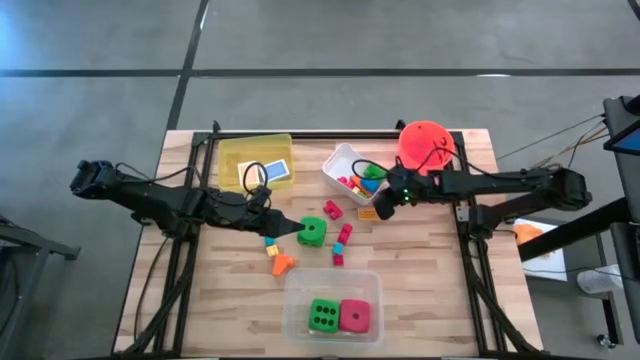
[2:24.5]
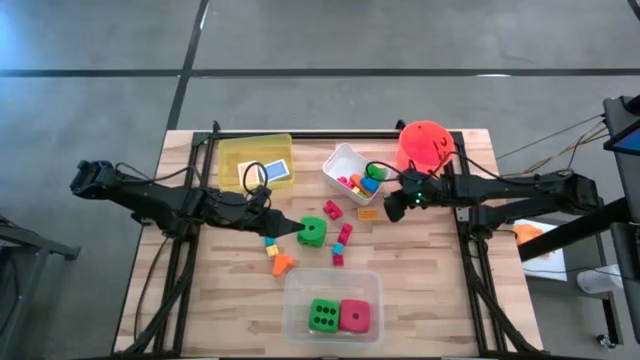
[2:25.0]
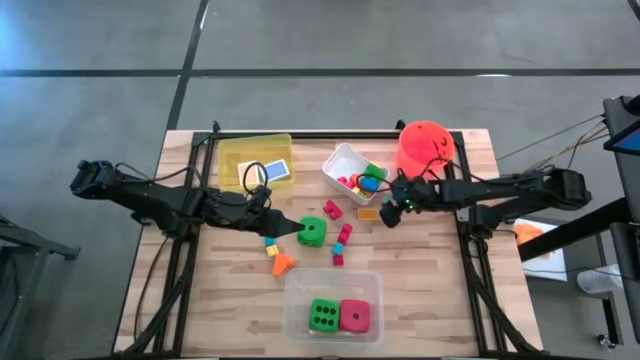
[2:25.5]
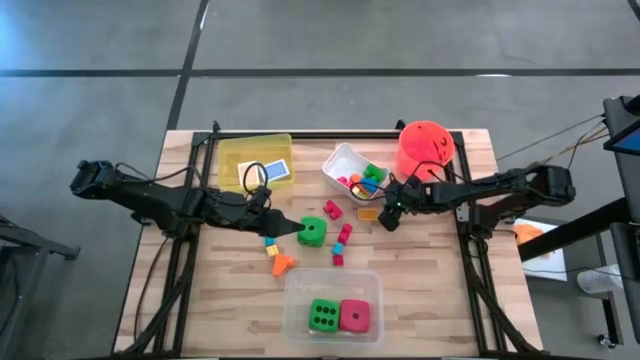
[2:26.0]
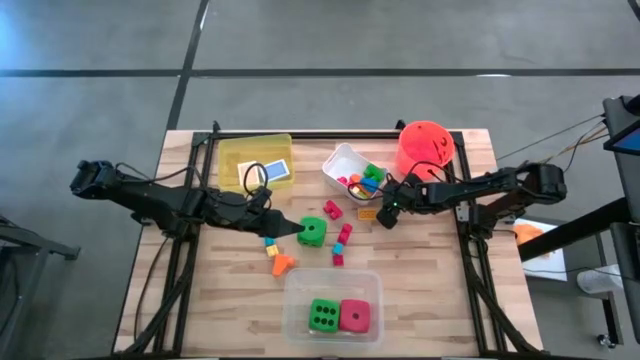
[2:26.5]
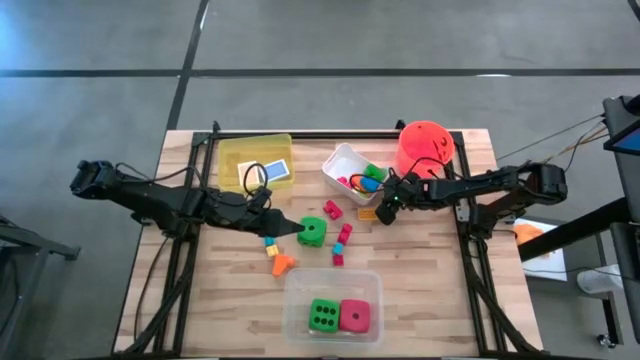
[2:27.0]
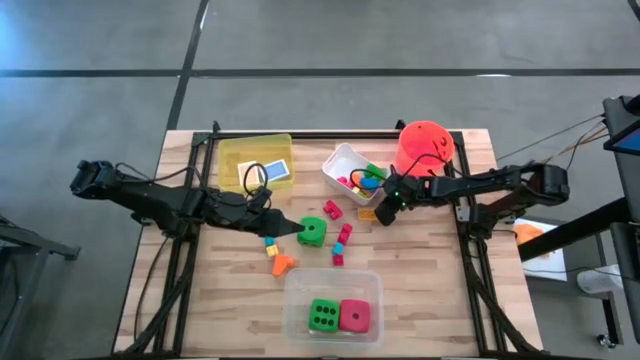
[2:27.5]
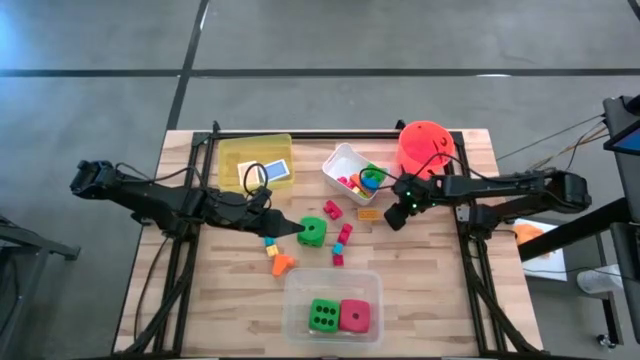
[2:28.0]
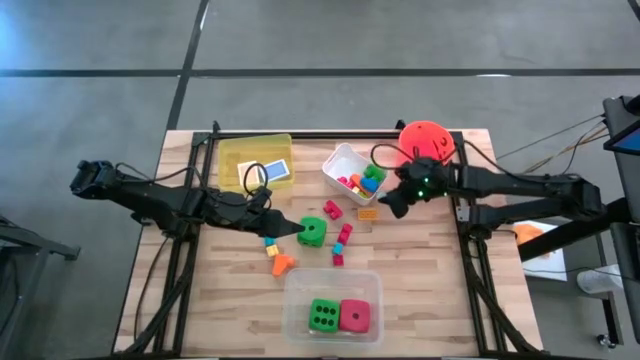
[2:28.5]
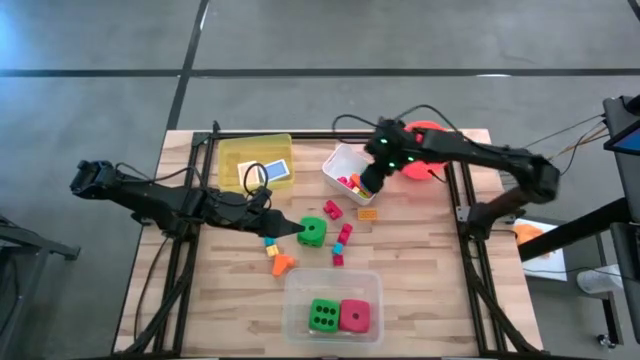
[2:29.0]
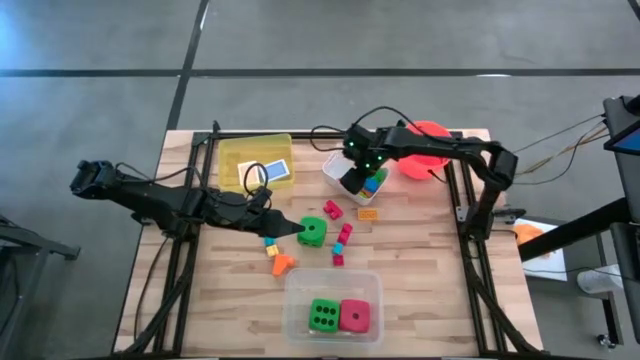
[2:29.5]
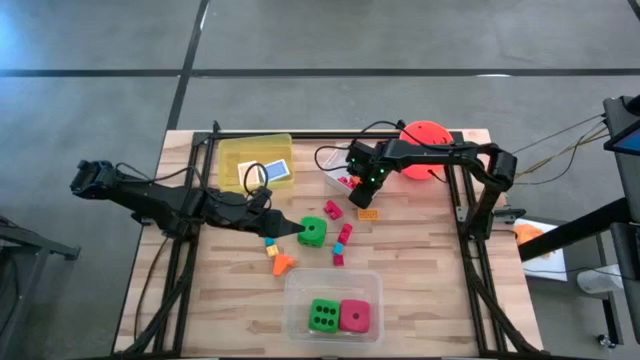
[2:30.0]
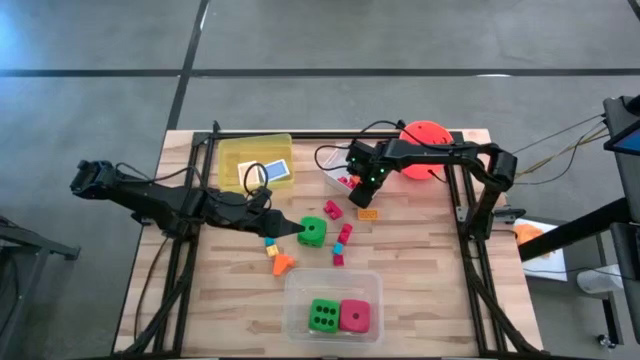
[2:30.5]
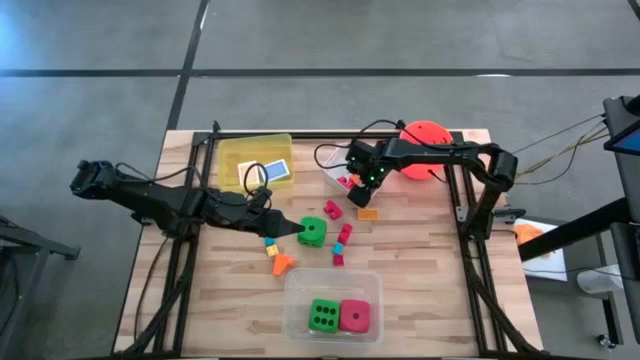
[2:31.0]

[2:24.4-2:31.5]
Task: Pick & Place Toys
Put the light blue game piece into the white bin

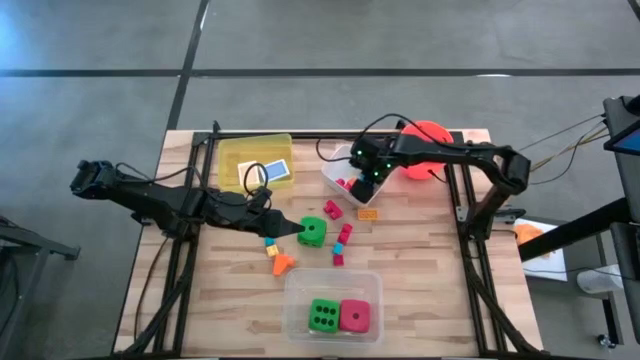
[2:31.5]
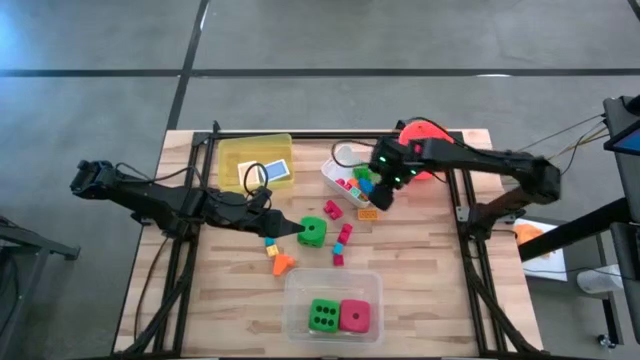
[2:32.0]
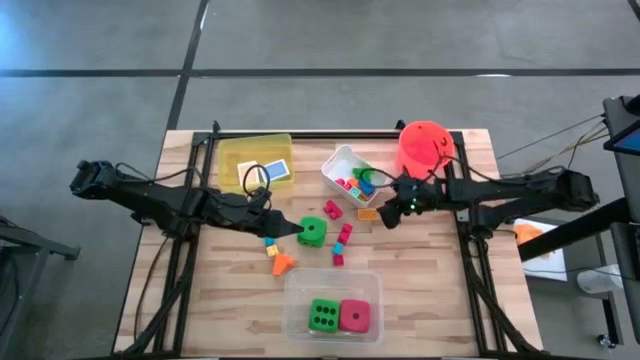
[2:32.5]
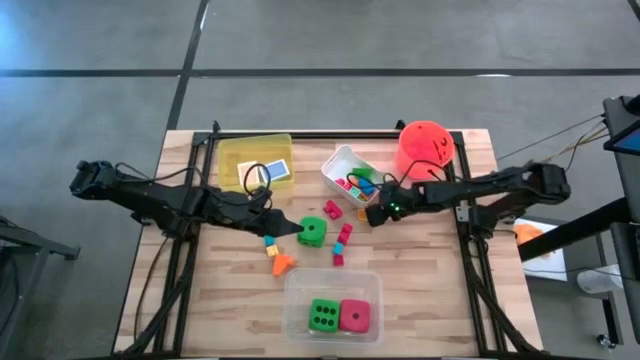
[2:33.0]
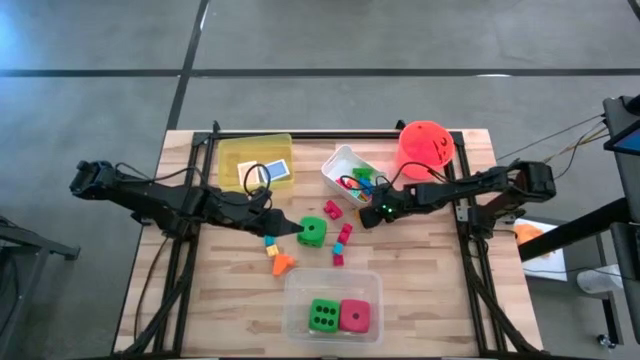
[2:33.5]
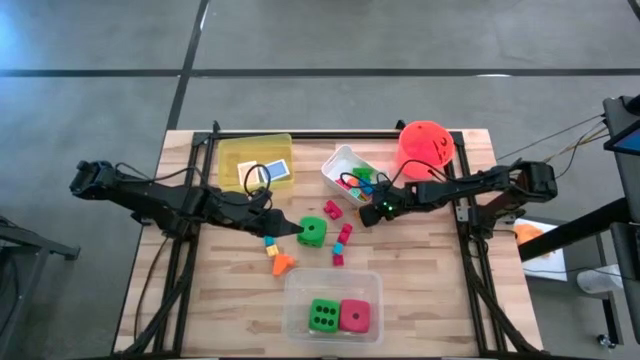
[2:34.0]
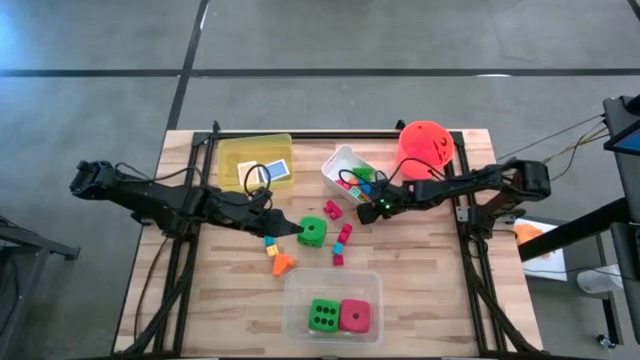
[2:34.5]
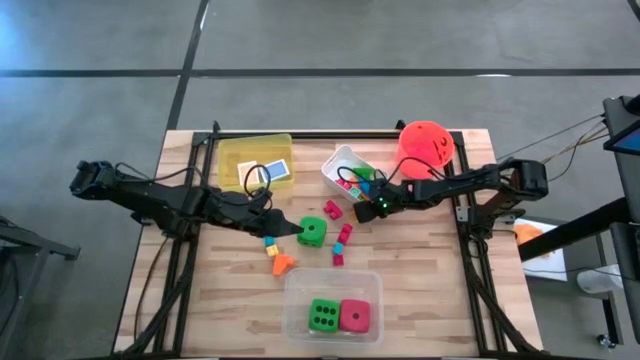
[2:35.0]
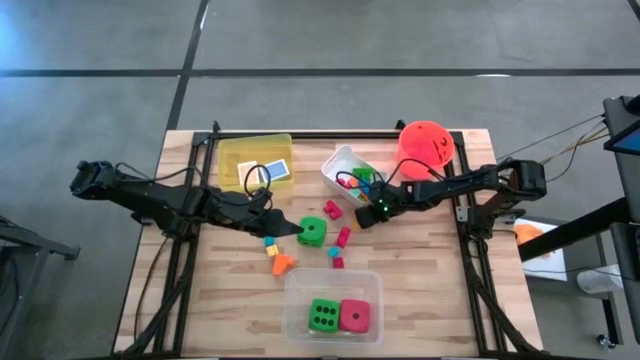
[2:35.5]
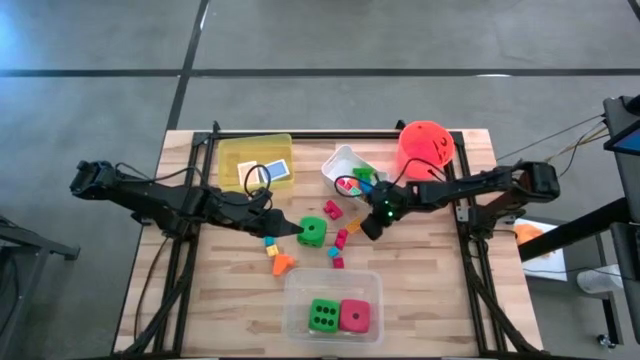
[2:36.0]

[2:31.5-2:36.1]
Put the yellow game piece into the white bin

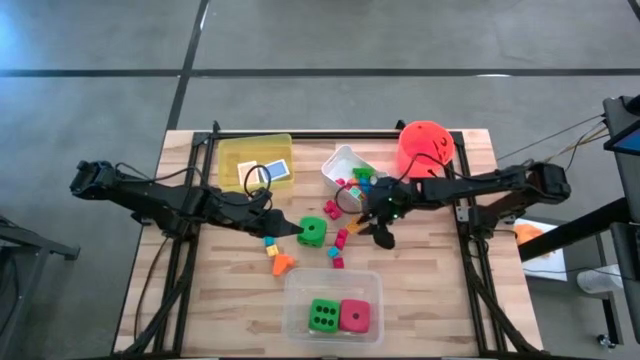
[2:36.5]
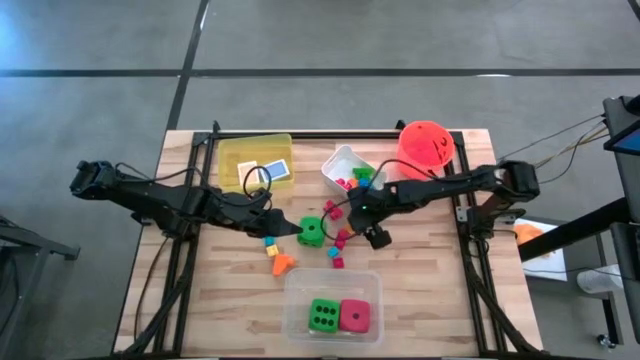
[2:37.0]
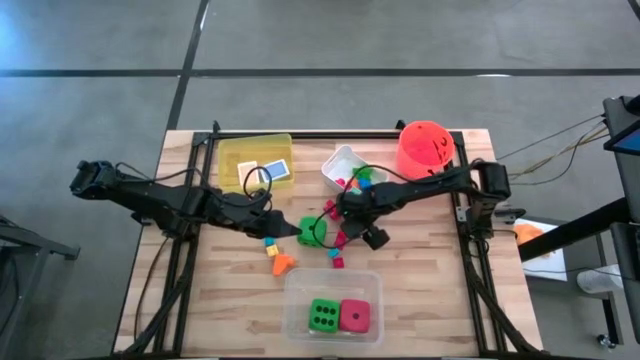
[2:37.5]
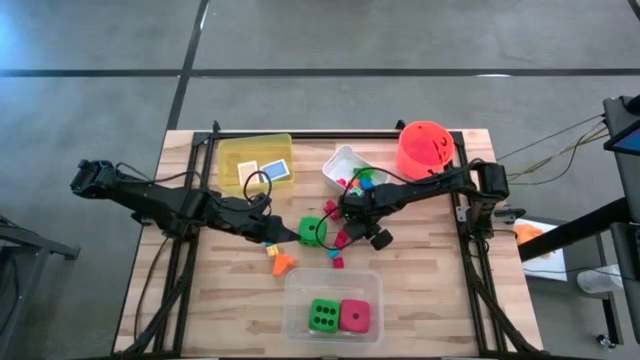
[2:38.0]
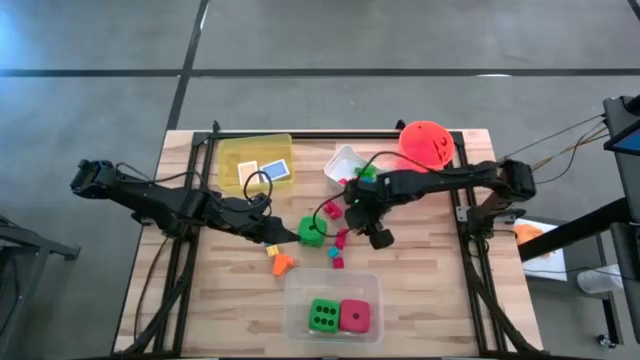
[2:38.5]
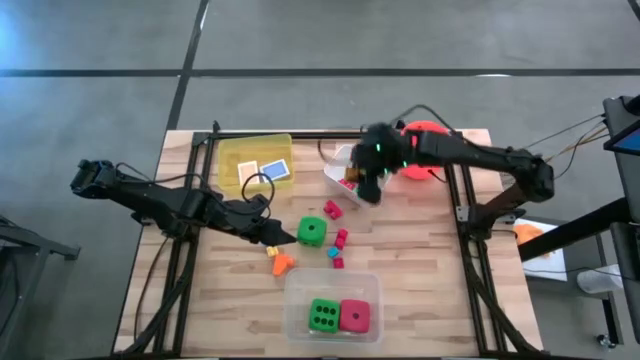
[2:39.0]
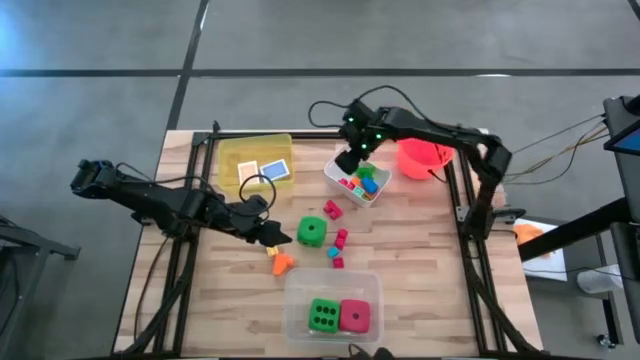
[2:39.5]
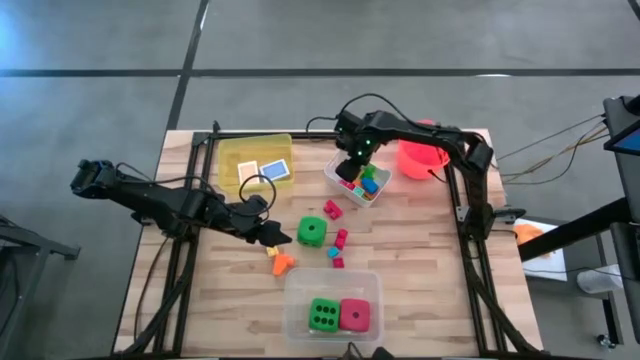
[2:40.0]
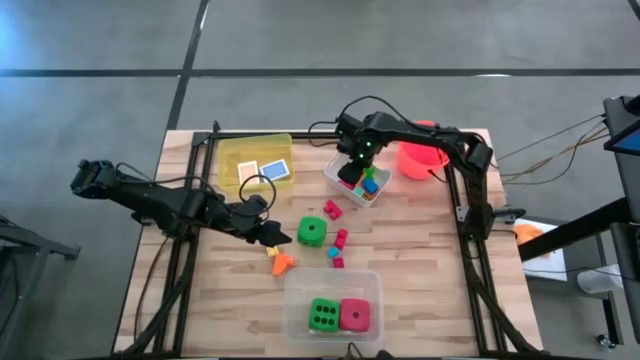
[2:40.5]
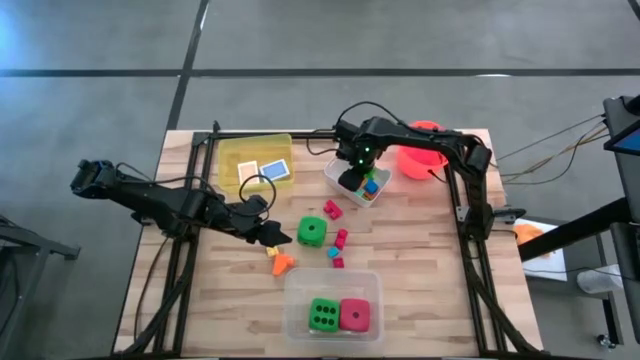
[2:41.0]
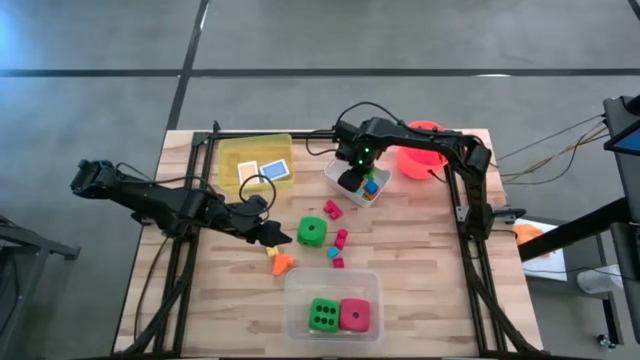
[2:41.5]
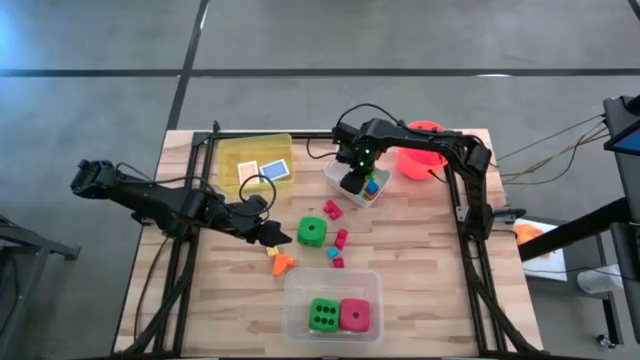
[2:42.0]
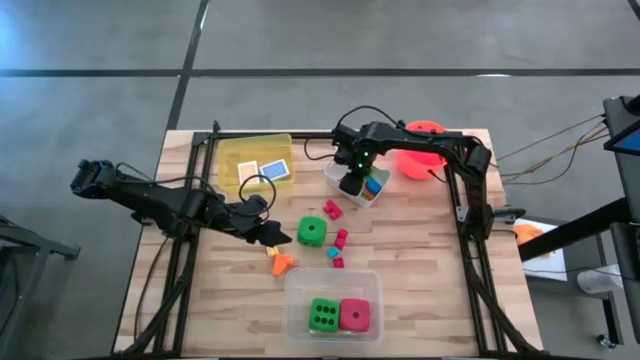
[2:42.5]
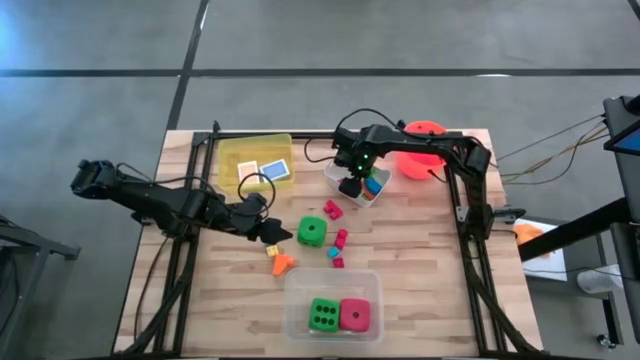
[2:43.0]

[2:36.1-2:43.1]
Put the yellow game piece into the white bin

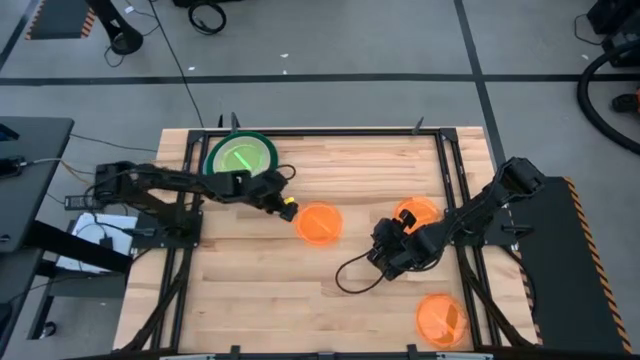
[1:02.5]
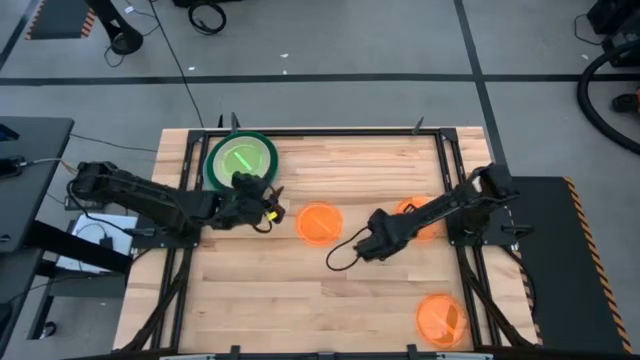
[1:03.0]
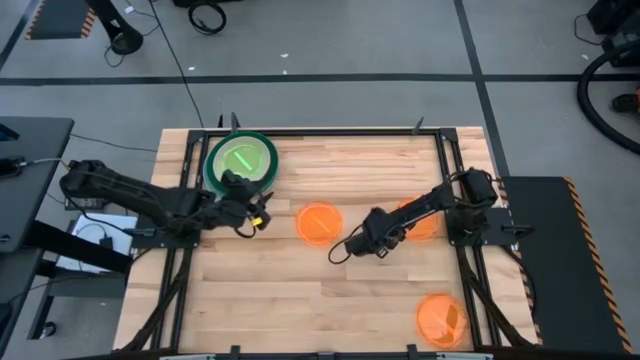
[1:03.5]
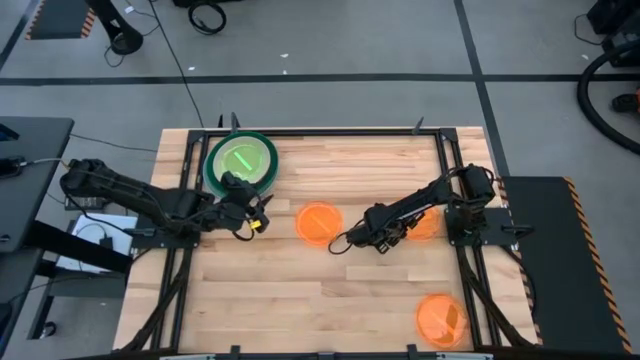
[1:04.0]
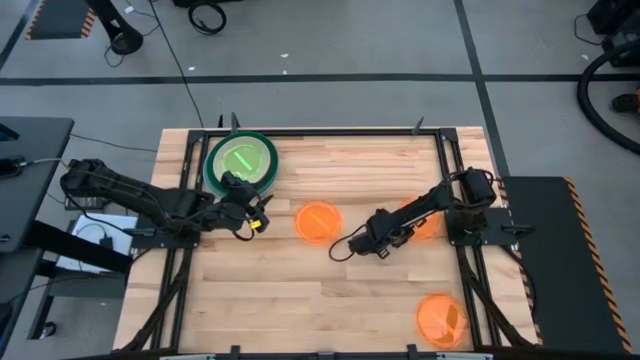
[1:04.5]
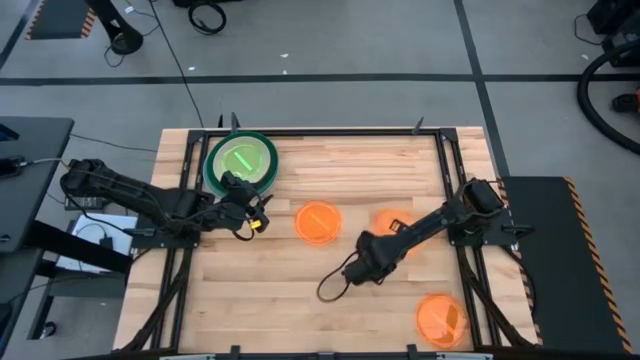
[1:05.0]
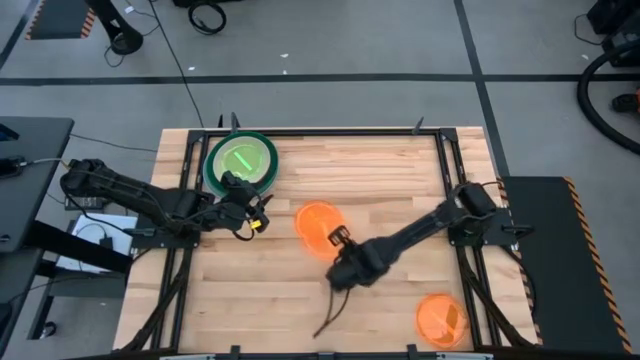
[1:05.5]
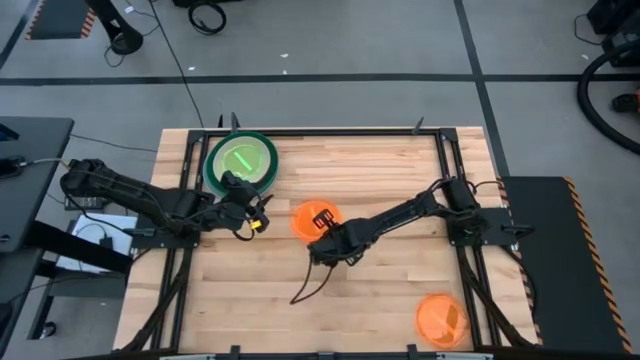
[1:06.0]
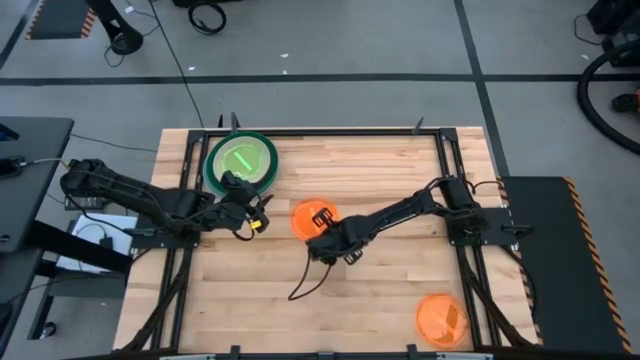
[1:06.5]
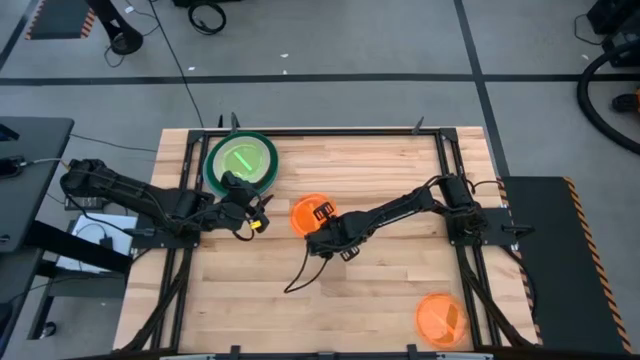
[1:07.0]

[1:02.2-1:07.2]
Task: Stack plastic plates
Stack the top right light orange plate on top of the light orange plate
